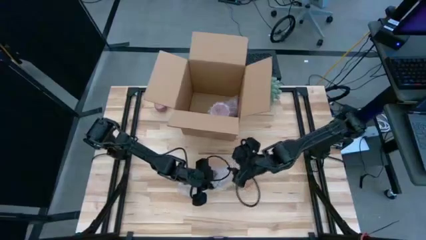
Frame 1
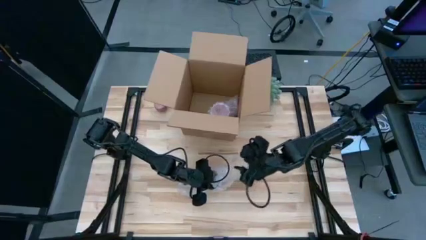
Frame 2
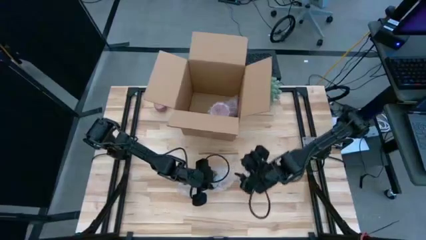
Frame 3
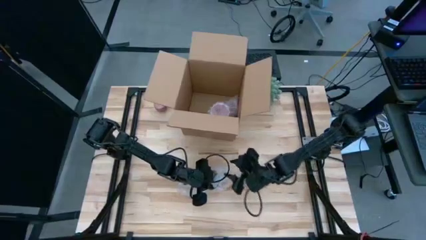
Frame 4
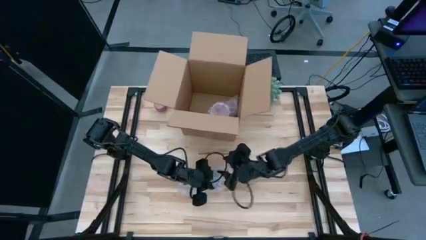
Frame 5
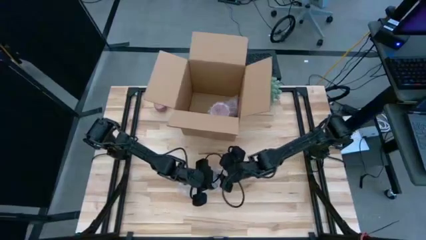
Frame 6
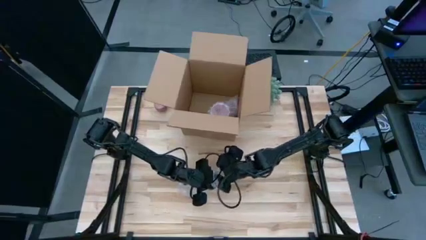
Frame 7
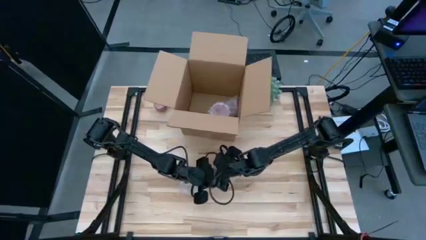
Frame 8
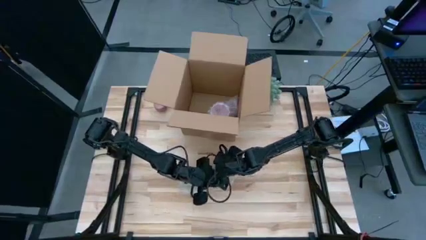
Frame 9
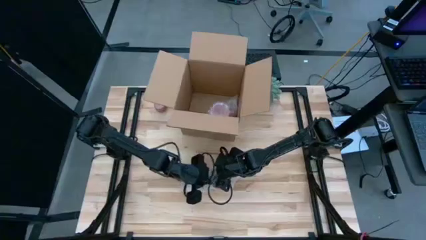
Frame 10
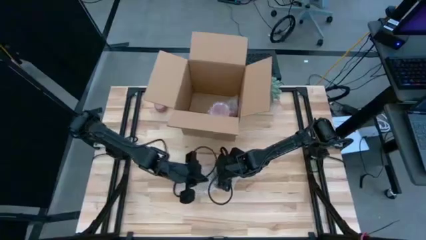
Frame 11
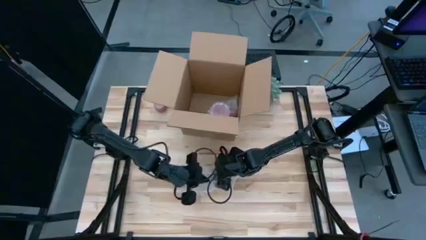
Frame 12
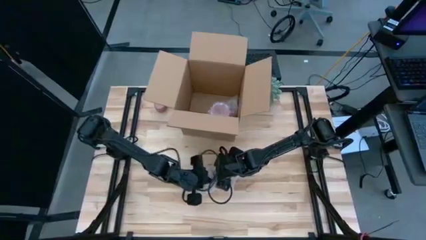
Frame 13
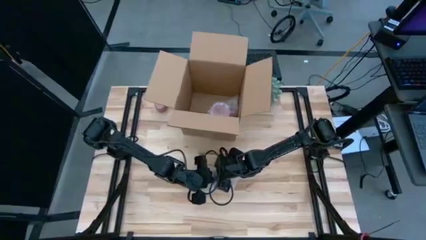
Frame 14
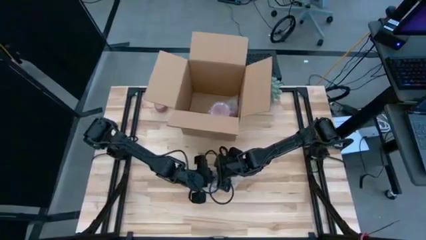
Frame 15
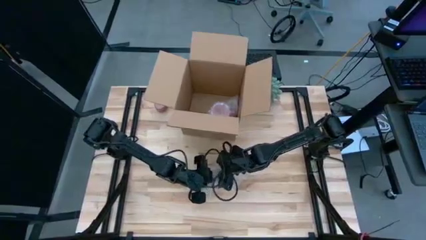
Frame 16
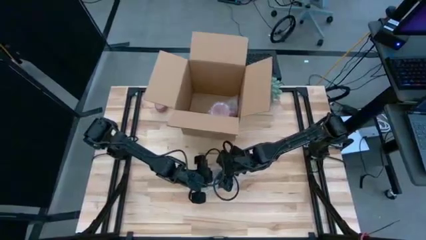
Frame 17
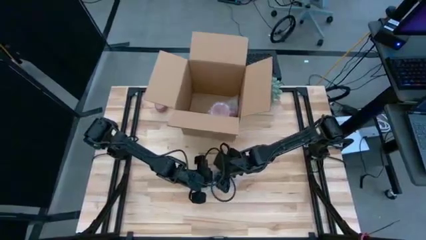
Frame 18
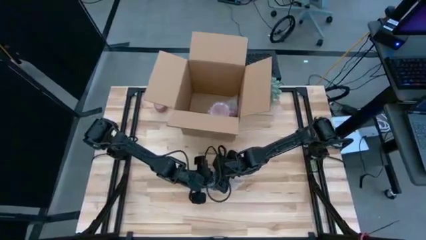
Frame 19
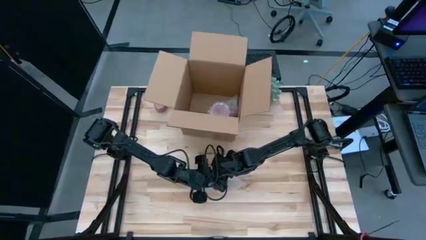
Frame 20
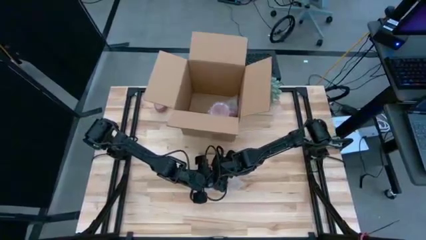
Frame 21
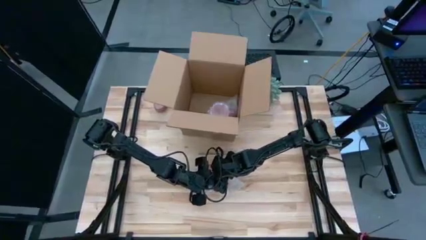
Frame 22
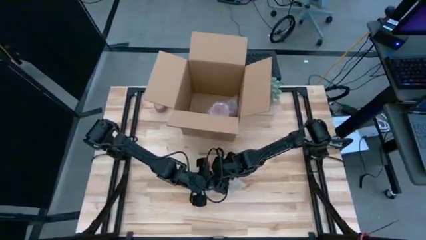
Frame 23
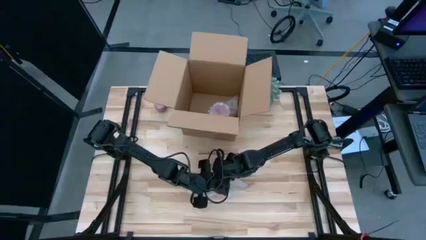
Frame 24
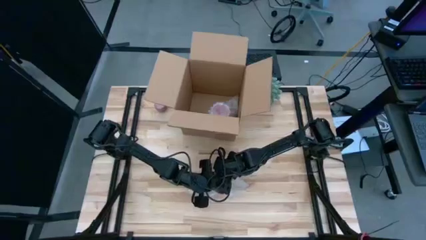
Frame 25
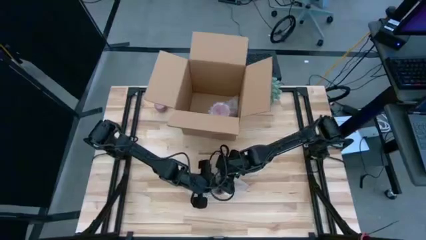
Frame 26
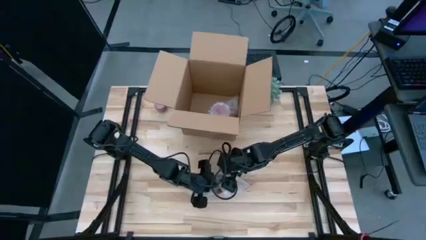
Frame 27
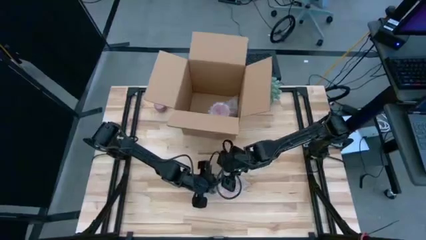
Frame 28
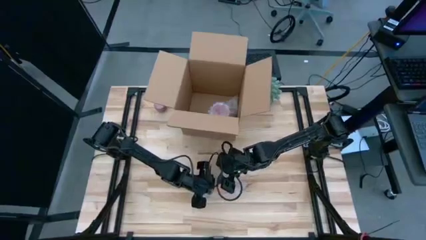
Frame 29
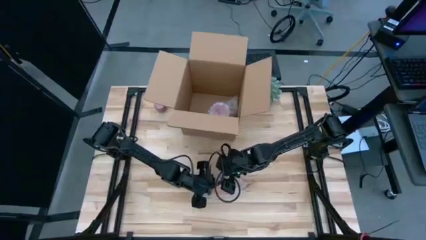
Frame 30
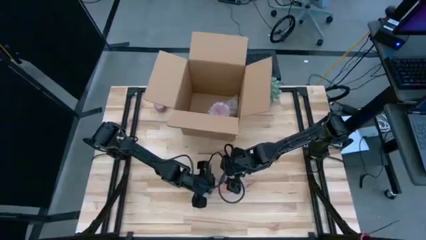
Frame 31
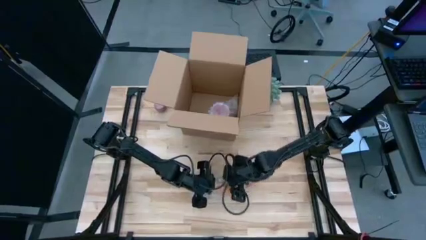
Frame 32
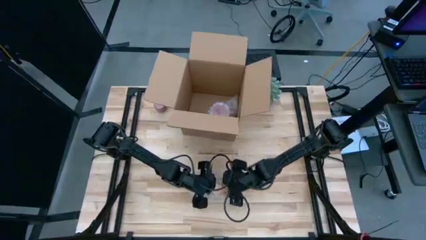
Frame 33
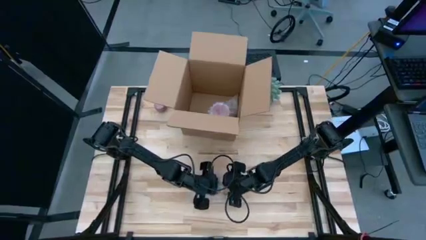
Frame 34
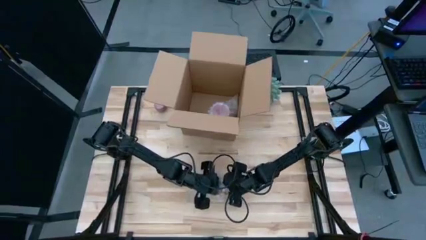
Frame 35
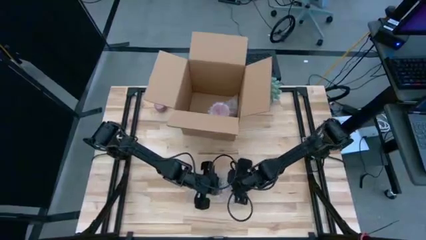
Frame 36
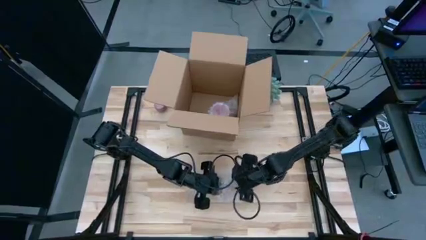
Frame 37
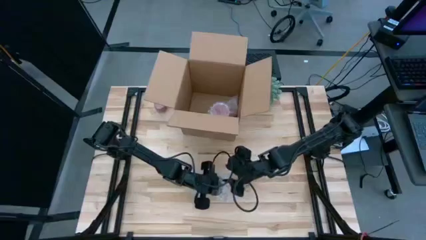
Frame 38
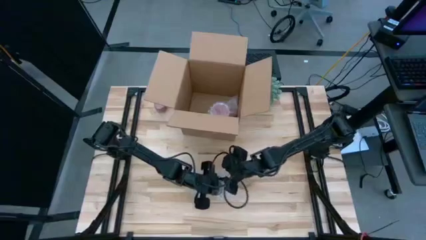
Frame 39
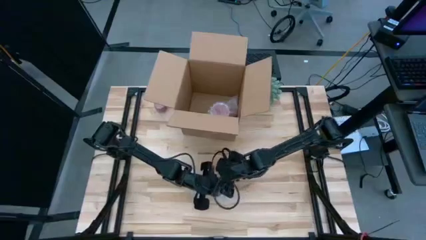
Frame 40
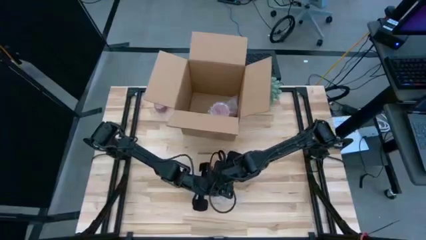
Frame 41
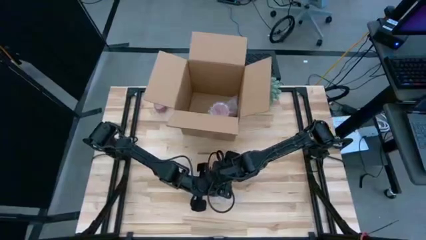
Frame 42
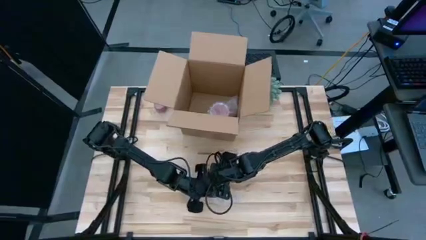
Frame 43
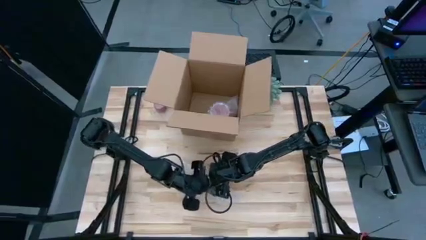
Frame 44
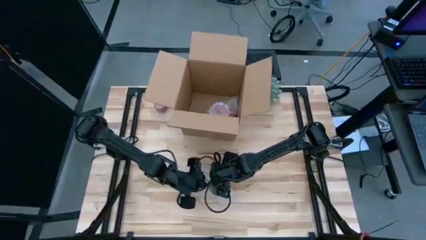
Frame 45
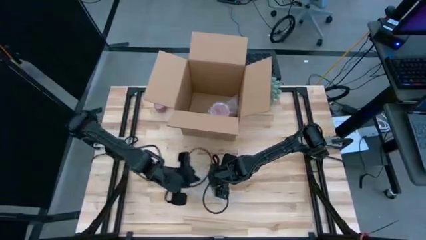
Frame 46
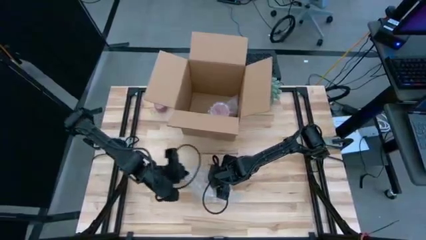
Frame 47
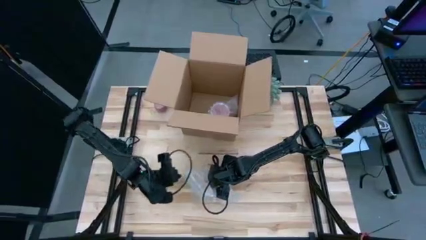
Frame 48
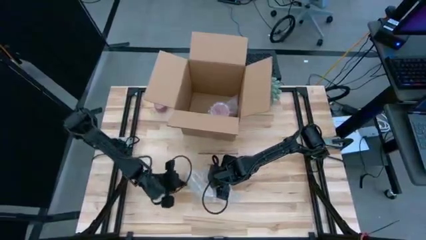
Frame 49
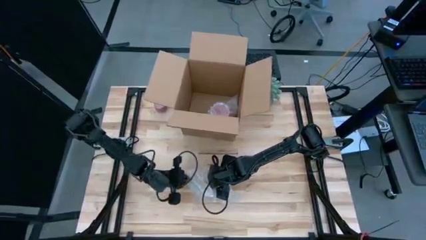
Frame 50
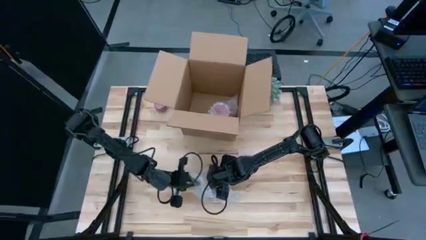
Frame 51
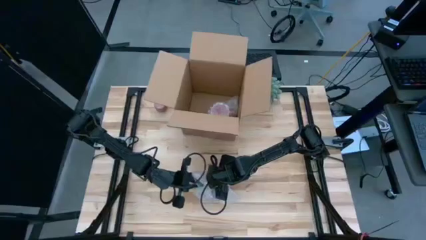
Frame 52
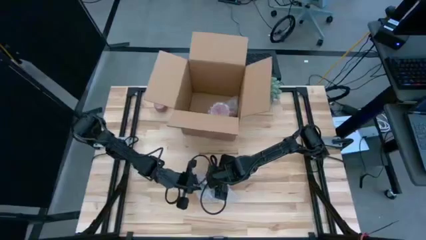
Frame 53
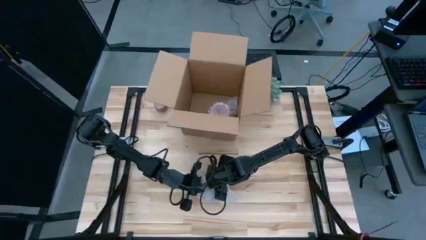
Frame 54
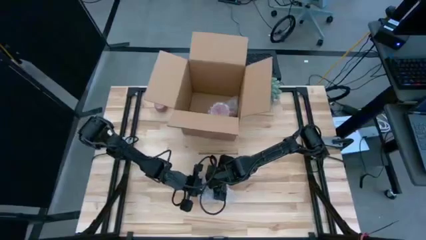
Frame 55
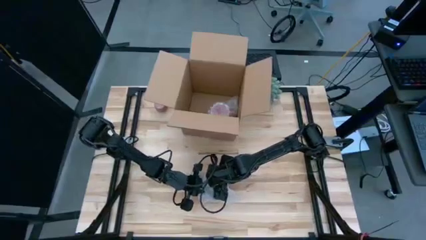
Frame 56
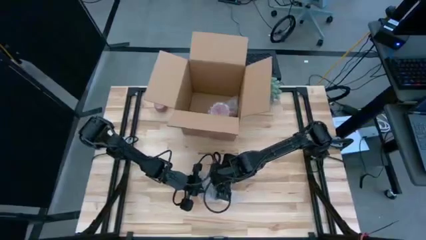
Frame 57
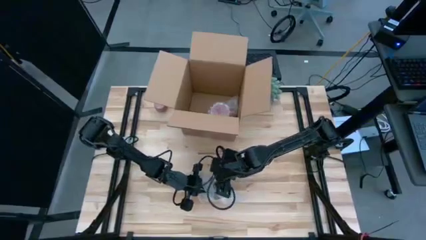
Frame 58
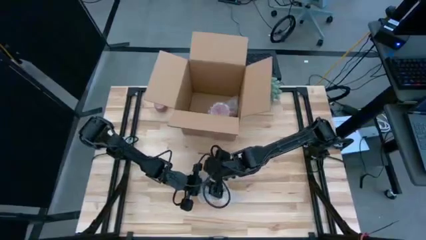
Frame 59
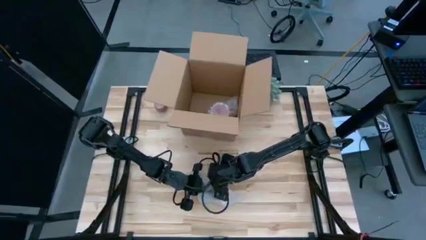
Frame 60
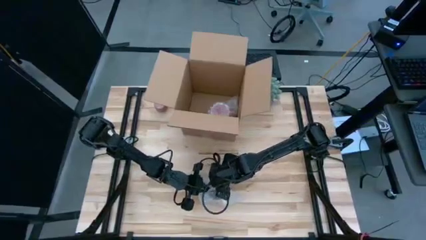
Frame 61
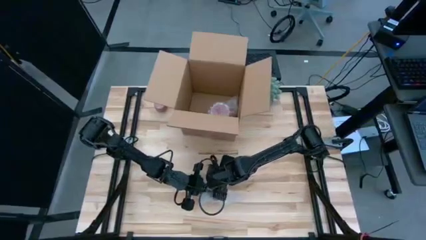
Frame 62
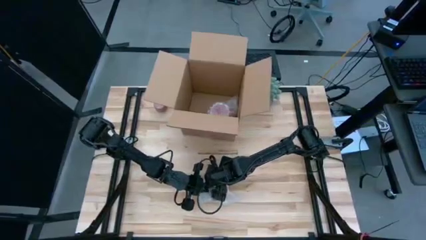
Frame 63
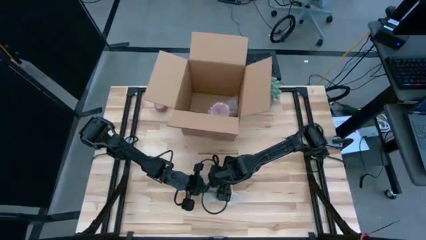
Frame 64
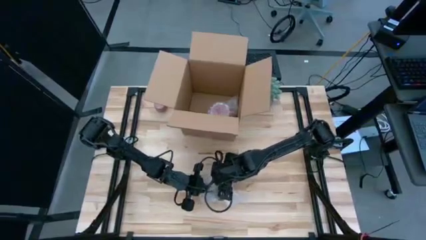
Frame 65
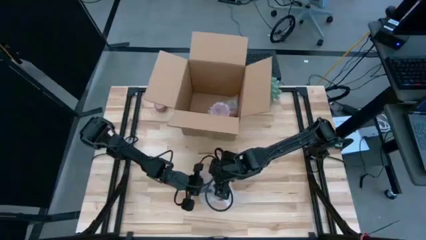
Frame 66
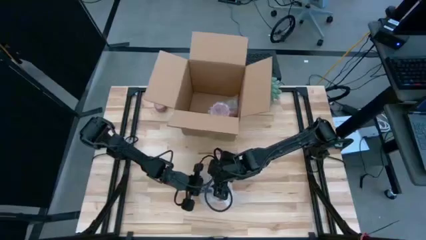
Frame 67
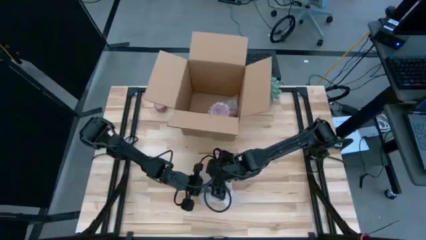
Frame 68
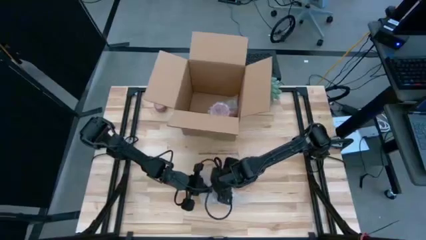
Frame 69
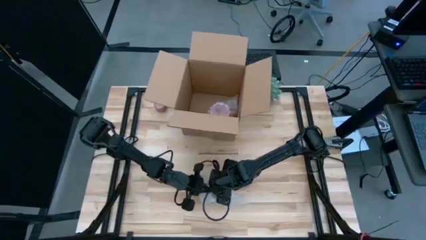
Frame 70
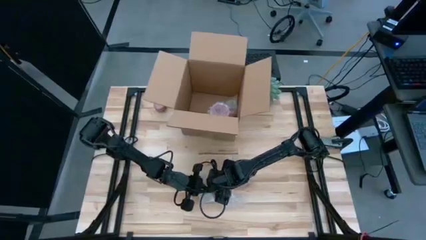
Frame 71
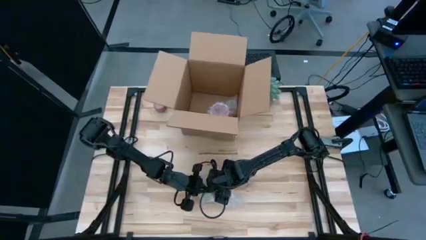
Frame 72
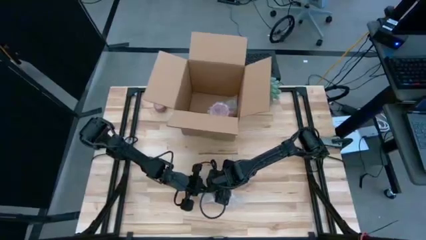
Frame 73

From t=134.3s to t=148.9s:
Task: wrap mug
Wrap the orange cup with bubble wrap

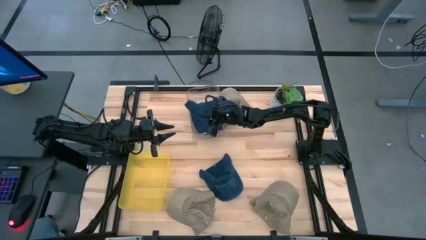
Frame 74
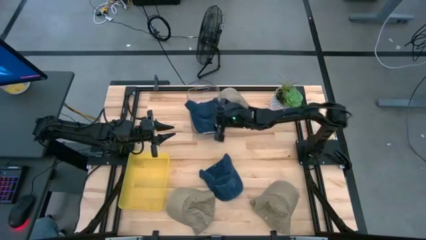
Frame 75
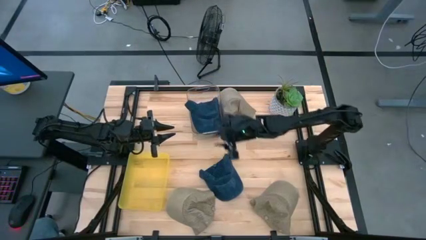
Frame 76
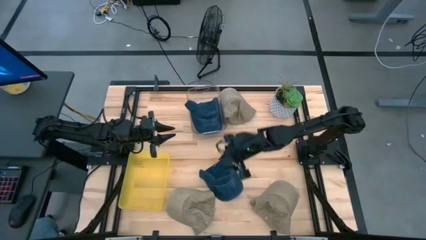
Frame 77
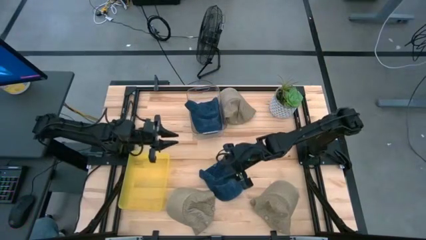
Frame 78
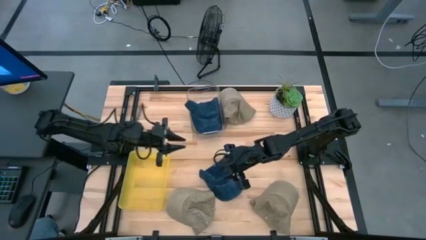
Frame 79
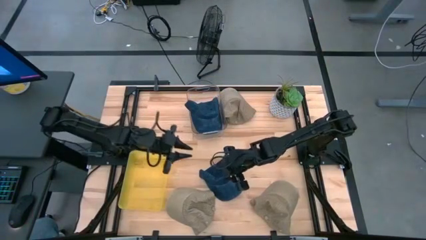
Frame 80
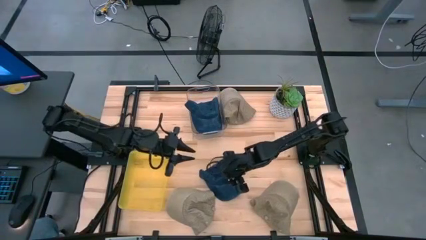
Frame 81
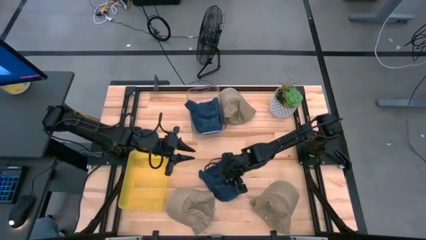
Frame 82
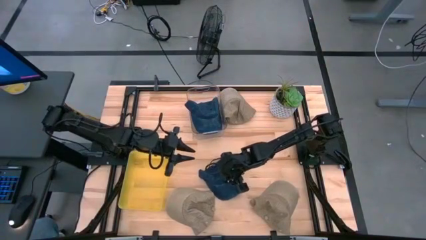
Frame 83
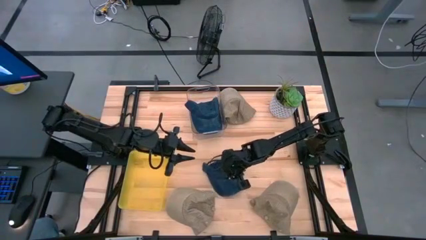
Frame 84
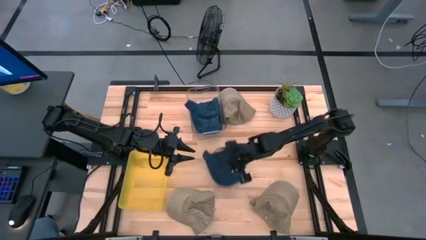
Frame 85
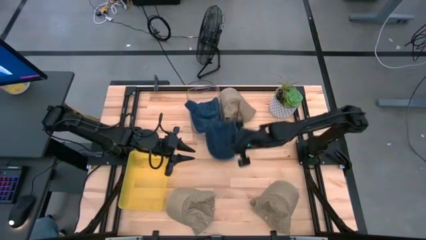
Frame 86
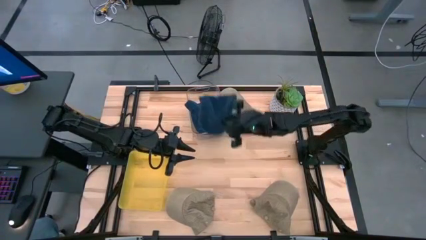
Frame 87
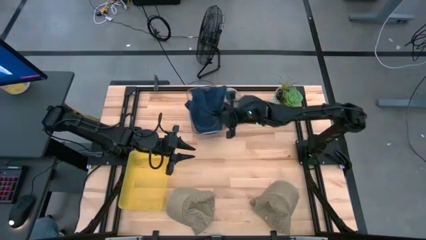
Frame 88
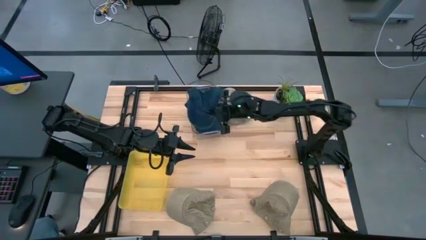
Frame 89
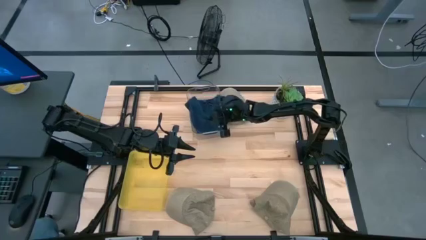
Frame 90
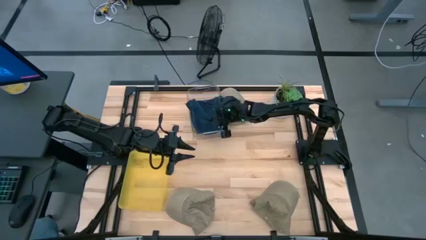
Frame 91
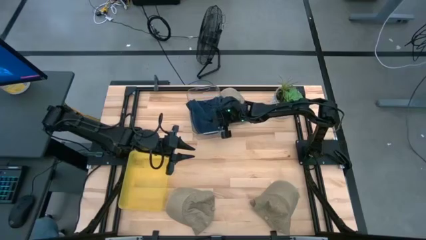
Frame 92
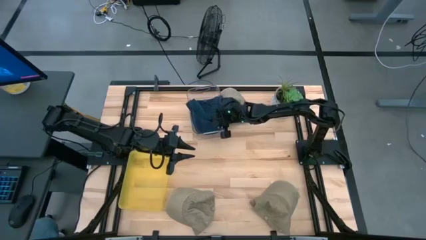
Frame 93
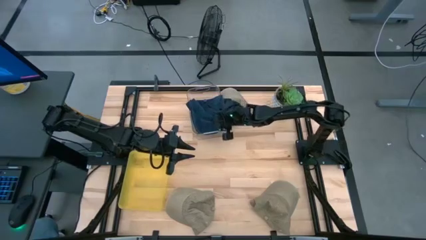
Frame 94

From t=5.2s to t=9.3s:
Task: Pick & Place hat
Put the blue cap into the transparent bin
